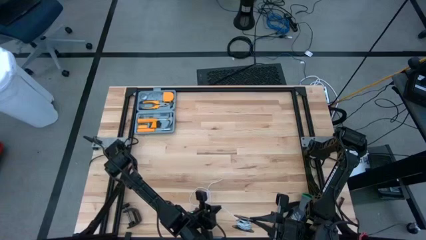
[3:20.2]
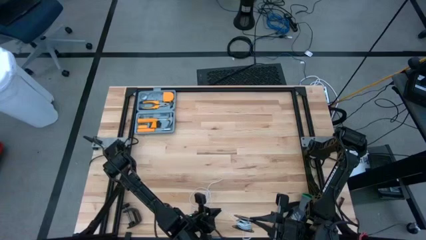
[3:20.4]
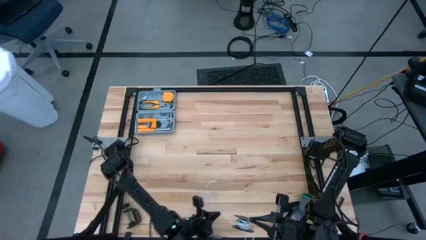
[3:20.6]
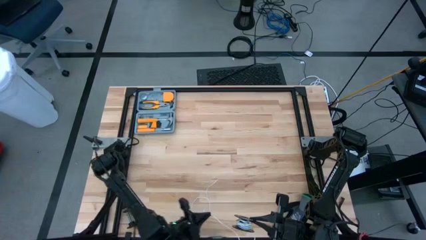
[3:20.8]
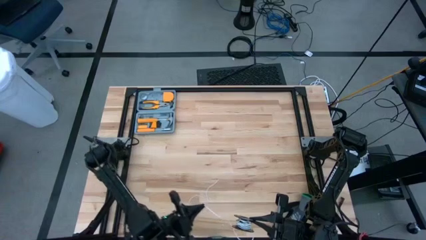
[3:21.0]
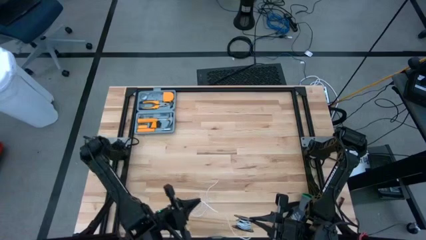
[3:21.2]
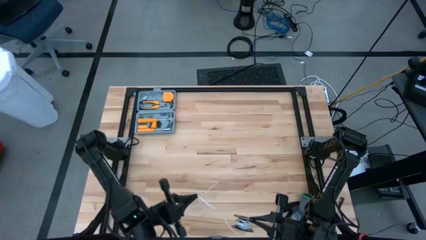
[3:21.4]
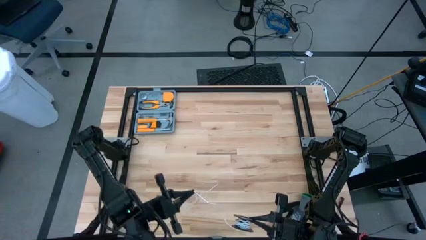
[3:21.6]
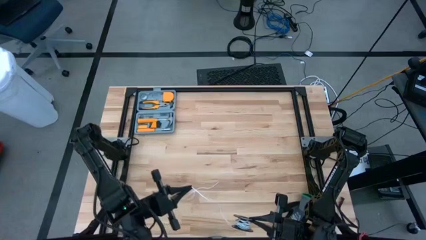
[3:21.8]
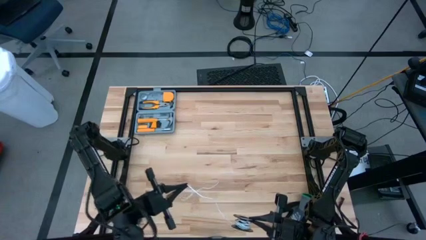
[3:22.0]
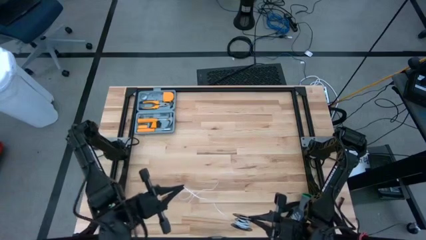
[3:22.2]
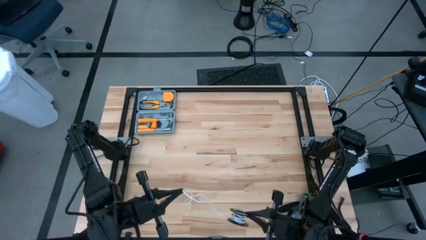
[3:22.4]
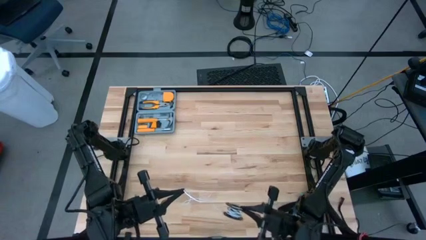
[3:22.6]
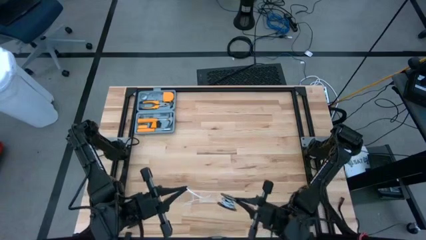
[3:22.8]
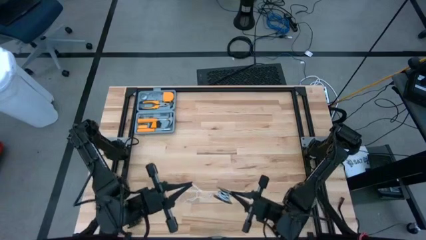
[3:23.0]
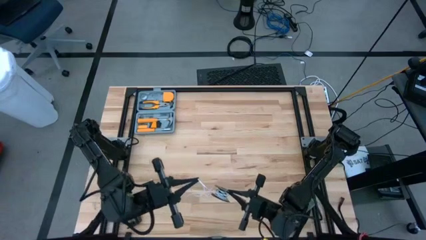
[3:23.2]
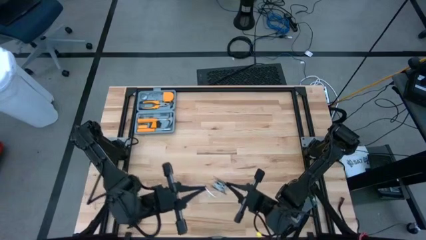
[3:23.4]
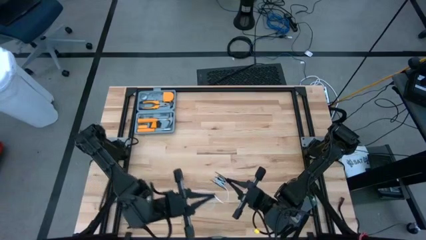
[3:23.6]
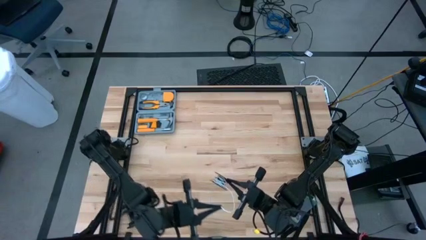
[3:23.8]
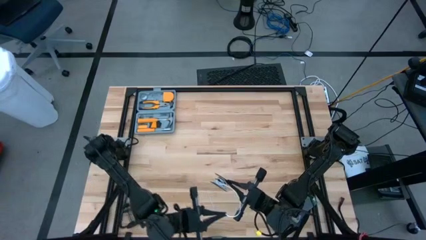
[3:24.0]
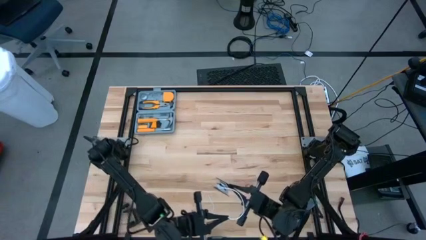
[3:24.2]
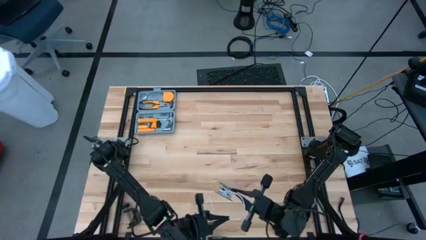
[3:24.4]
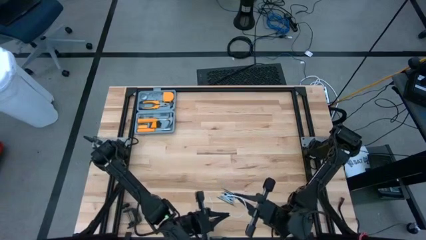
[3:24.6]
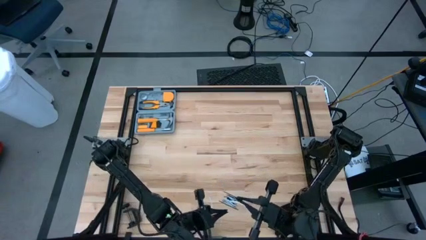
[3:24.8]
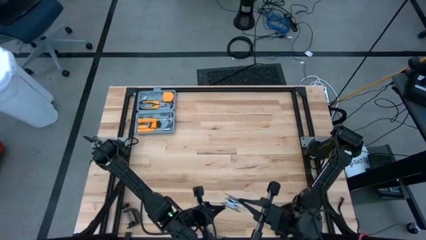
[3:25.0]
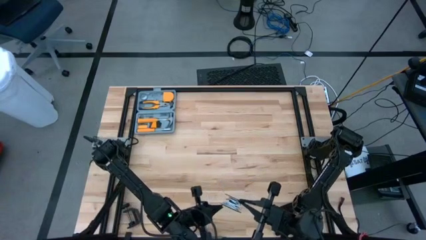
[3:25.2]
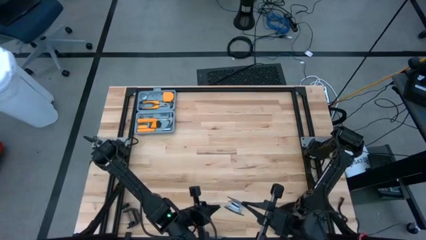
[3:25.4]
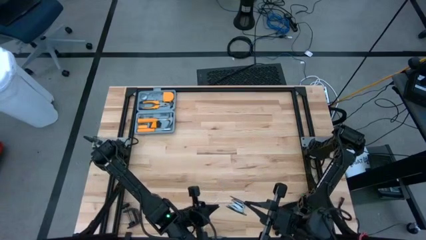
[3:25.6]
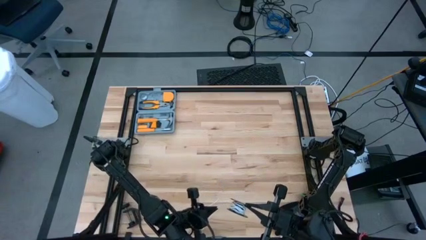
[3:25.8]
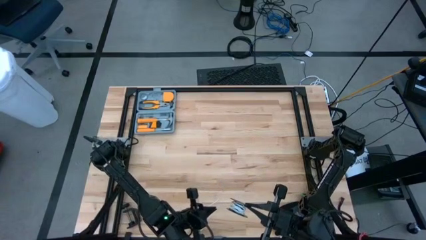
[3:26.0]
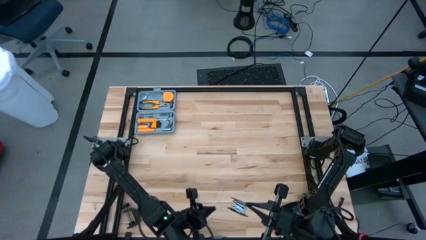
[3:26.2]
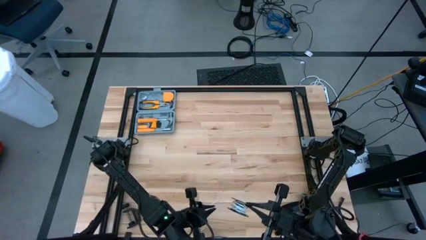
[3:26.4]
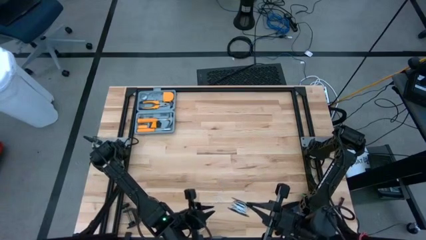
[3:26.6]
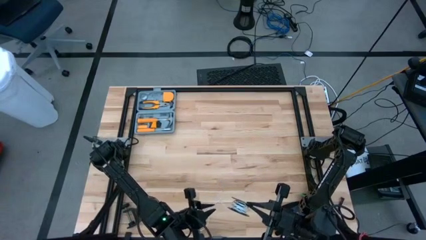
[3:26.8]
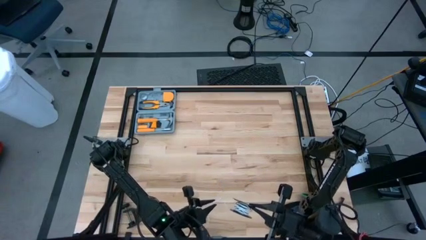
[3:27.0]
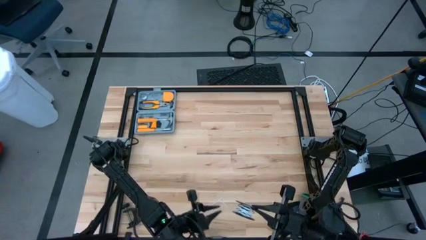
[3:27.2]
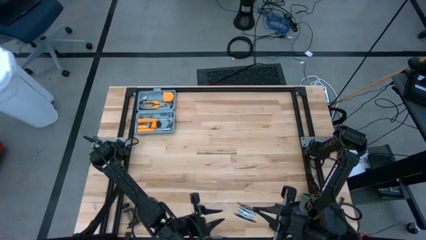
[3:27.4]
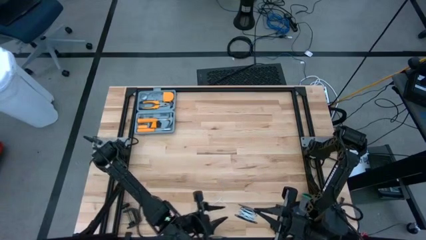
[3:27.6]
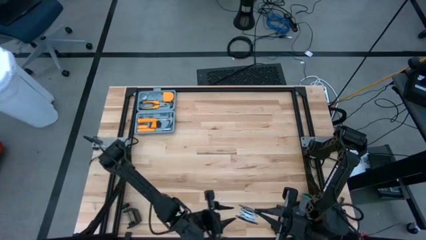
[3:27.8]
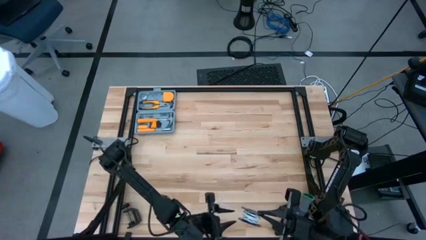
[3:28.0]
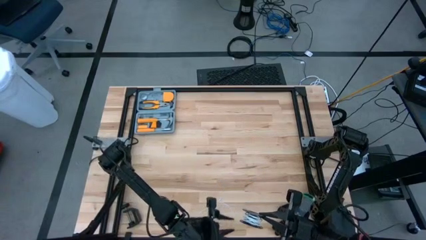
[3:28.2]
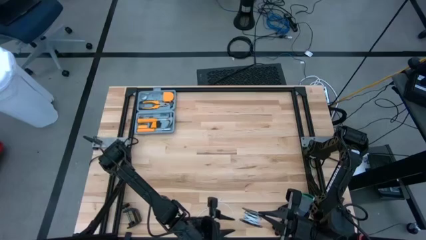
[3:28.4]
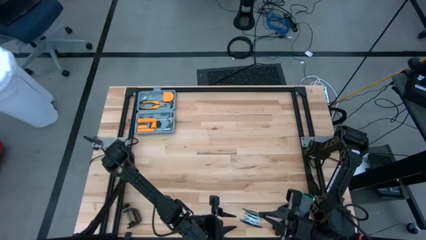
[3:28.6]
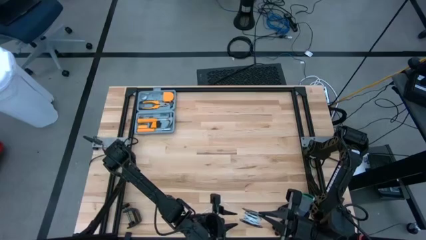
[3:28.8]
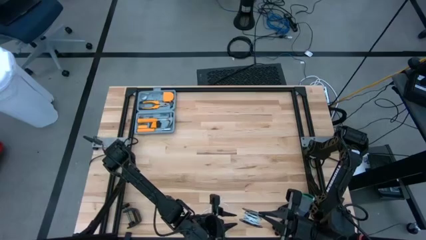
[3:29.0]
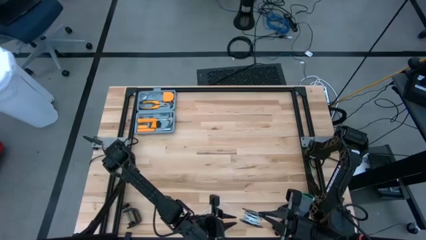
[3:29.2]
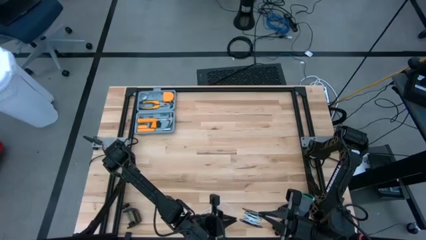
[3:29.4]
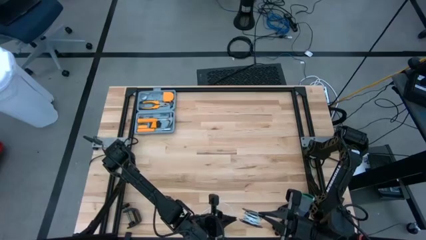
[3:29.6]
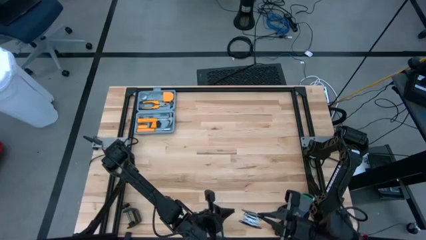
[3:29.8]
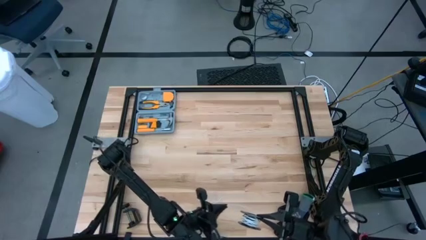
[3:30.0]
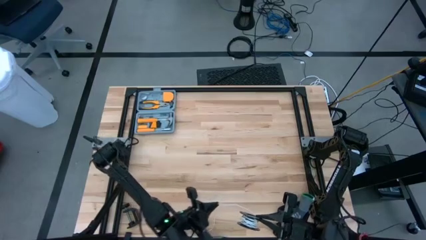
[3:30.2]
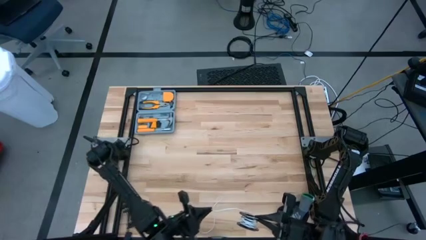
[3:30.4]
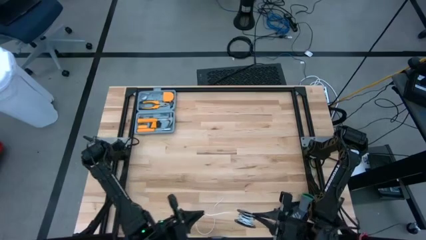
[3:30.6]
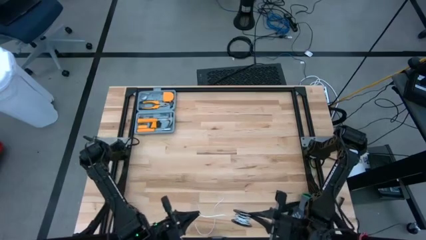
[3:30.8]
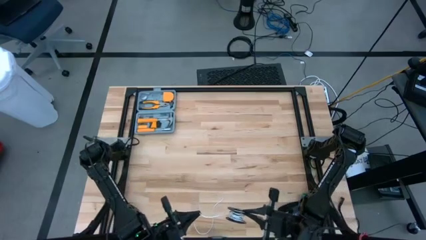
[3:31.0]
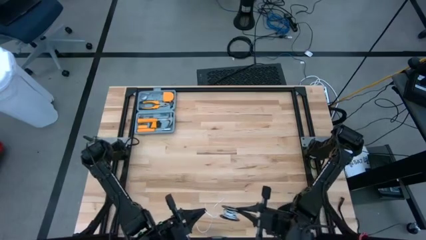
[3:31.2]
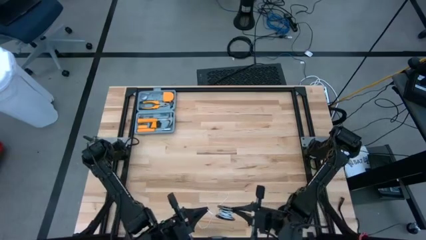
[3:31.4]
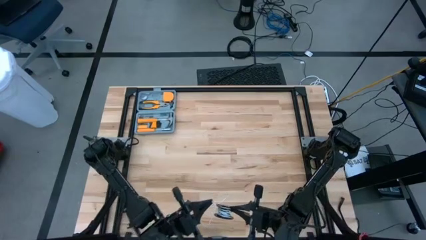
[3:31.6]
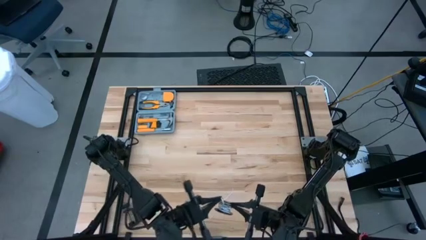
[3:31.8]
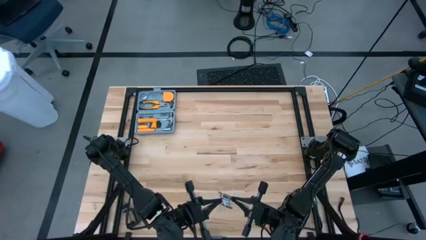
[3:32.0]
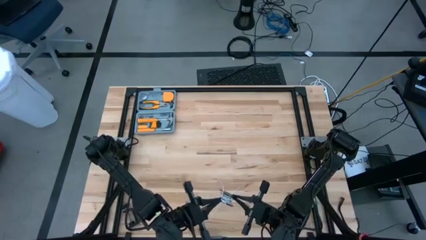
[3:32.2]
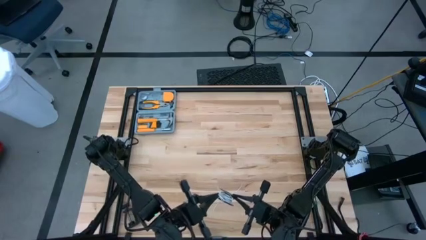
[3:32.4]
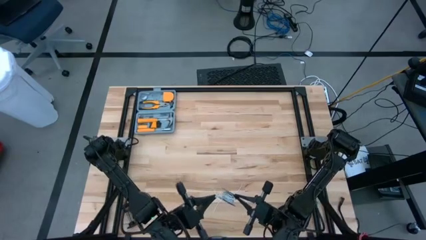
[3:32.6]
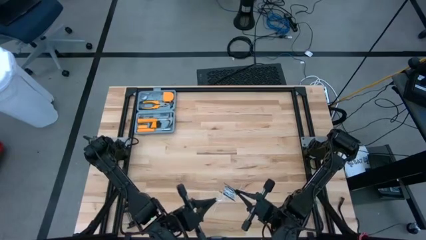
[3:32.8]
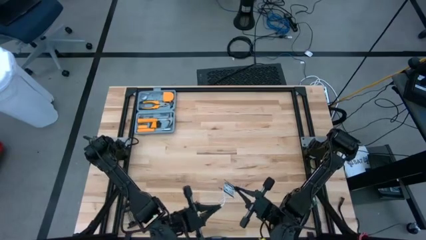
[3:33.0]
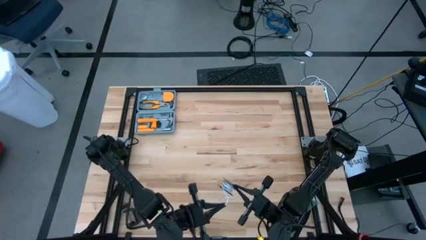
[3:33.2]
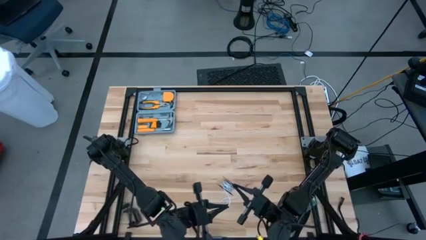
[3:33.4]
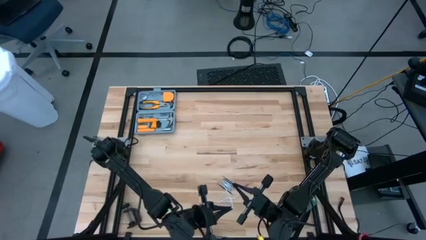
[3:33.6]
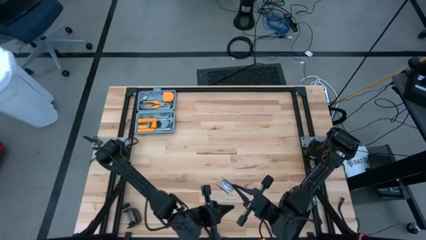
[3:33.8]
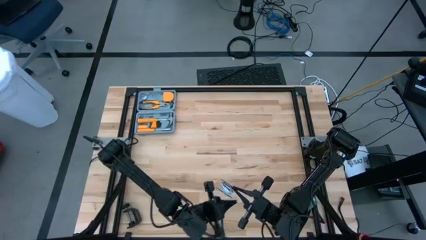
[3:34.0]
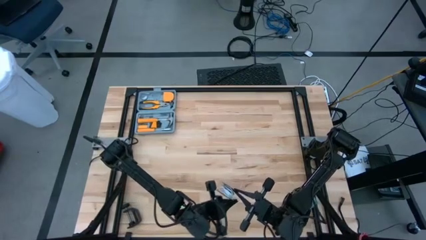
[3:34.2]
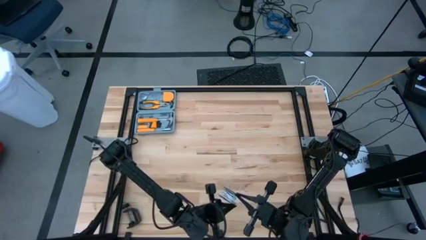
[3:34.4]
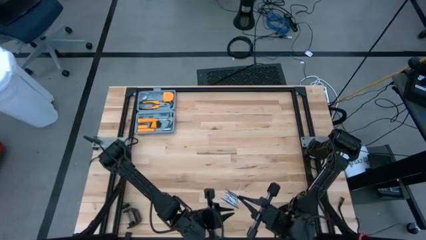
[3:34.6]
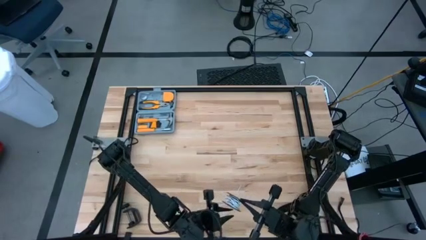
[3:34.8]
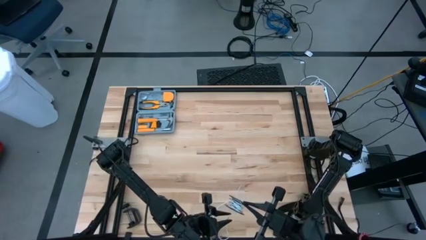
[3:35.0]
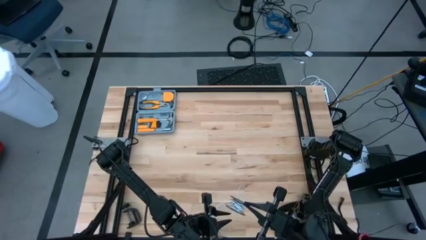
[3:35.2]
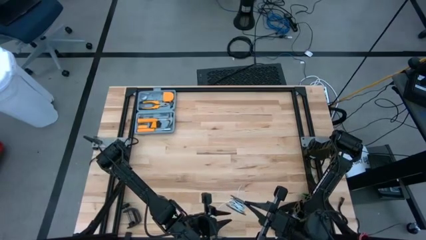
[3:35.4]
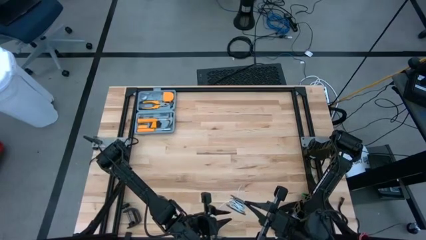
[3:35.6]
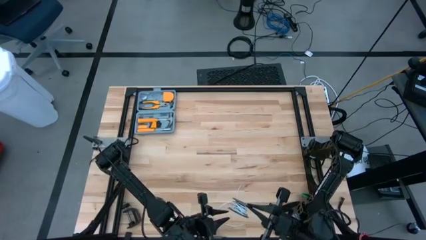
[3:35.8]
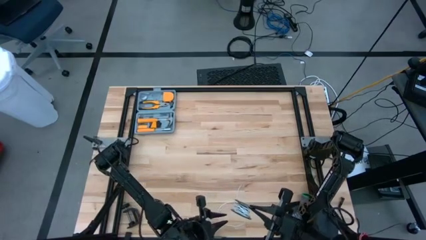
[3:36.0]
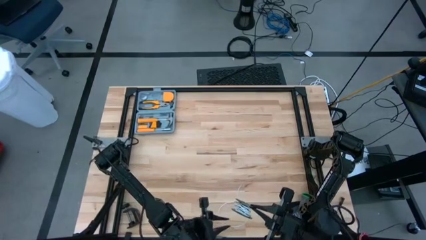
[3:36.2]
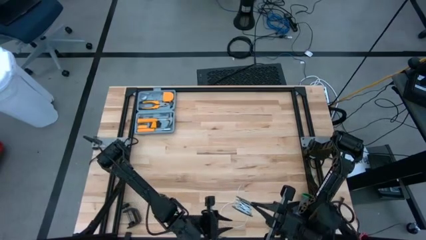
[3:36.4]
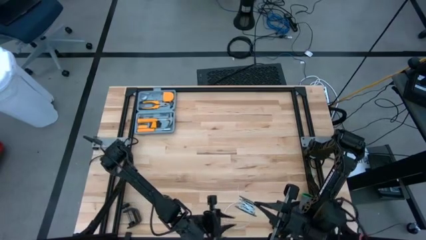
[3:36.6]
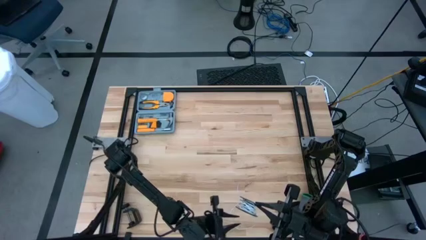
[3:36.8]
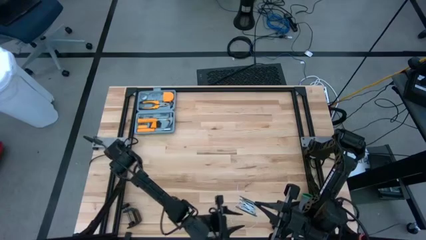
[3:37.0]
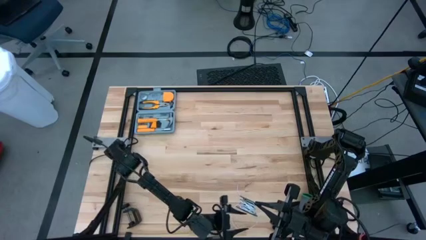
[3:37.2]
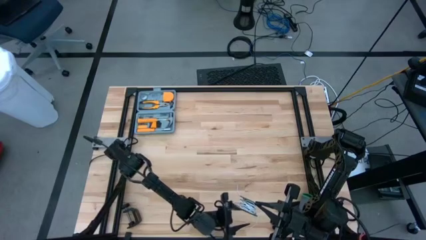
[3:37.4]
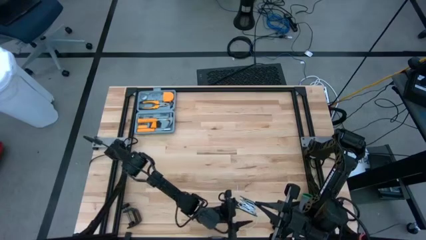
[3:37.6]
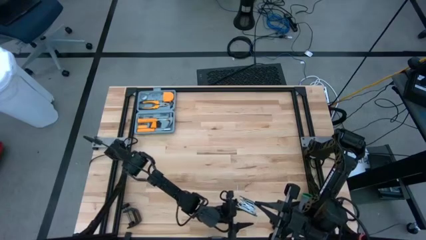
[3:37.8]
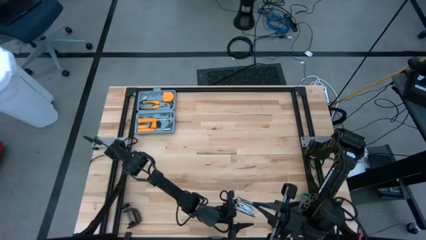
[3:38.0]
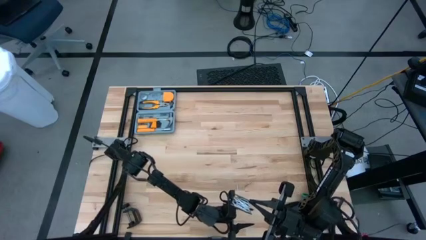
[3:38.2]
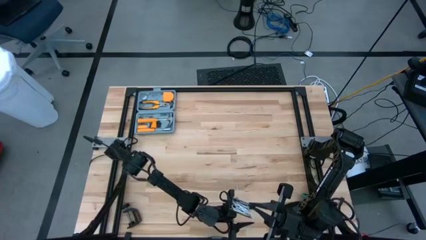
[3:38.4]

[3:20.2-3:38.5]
Task: Coil cords
Coil the white wire on the spool
